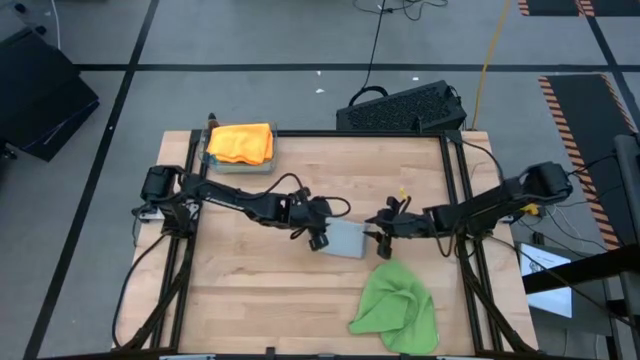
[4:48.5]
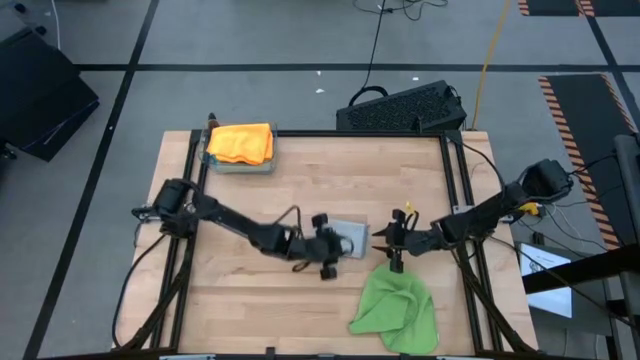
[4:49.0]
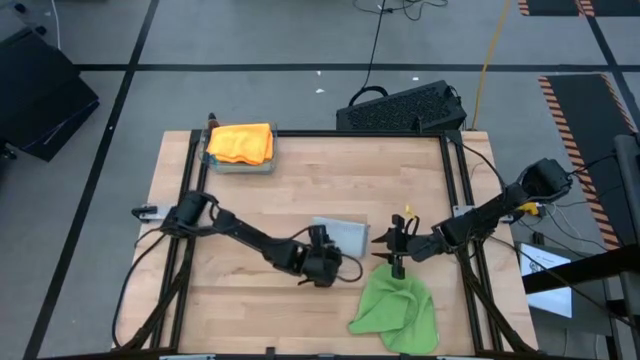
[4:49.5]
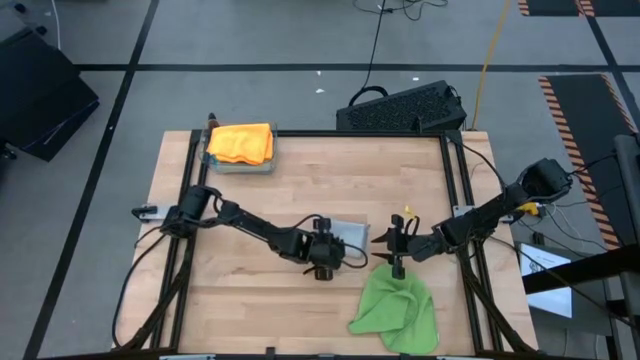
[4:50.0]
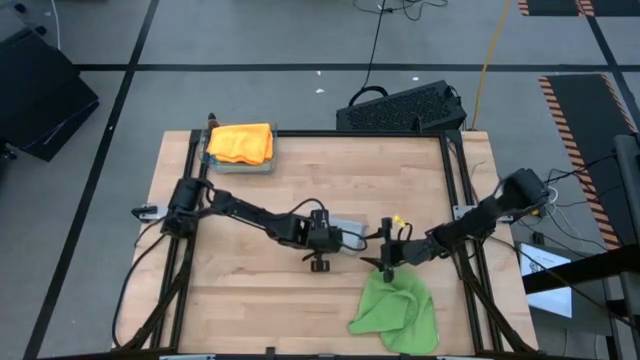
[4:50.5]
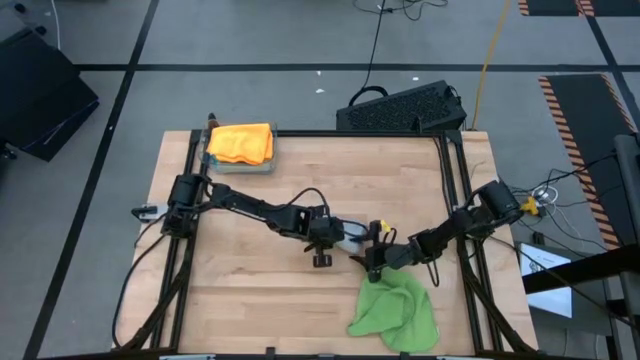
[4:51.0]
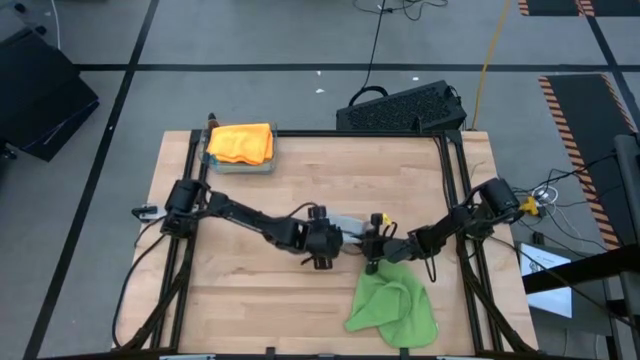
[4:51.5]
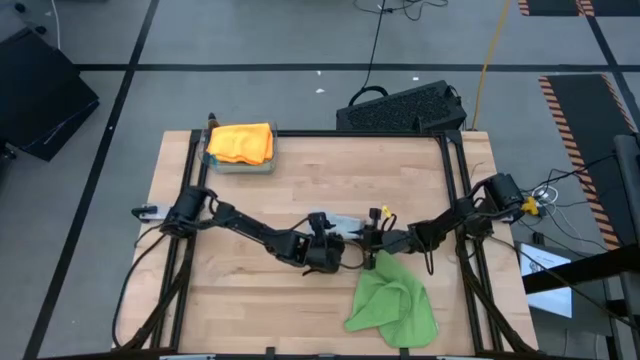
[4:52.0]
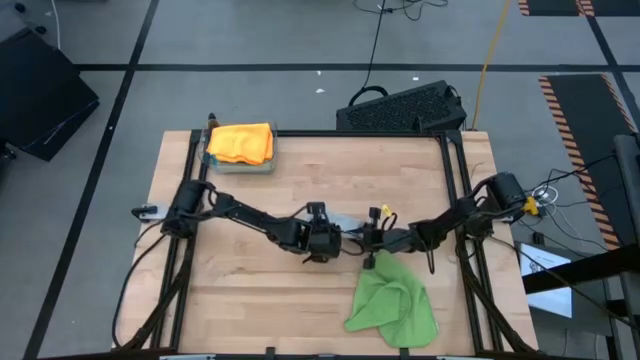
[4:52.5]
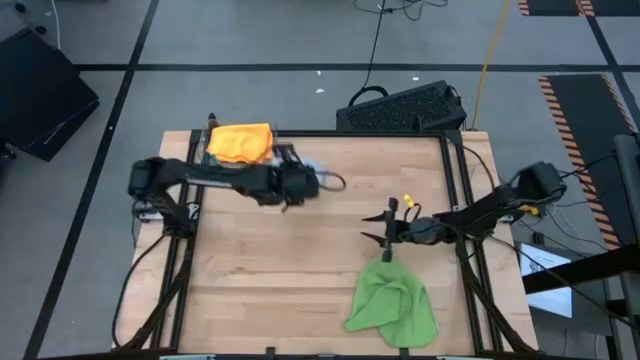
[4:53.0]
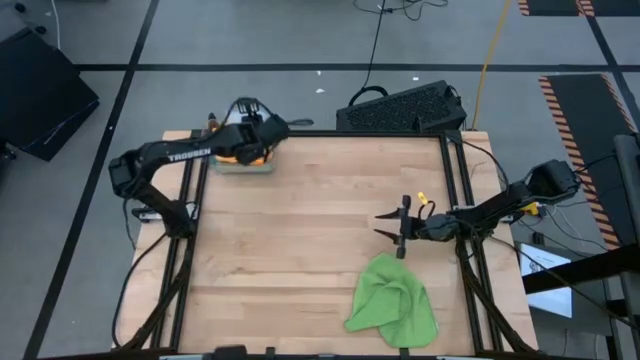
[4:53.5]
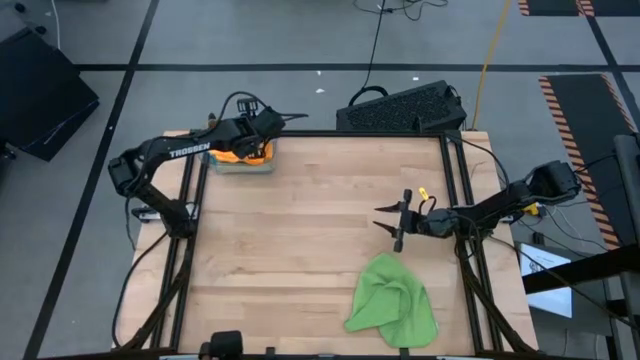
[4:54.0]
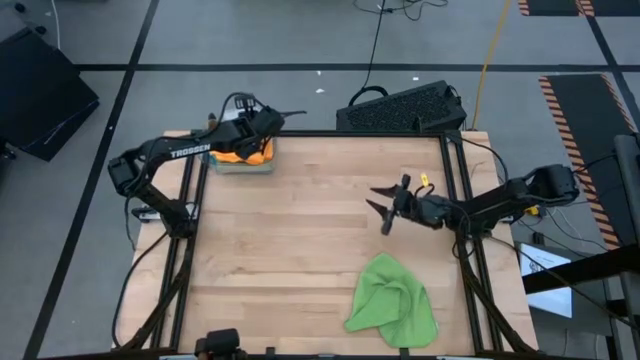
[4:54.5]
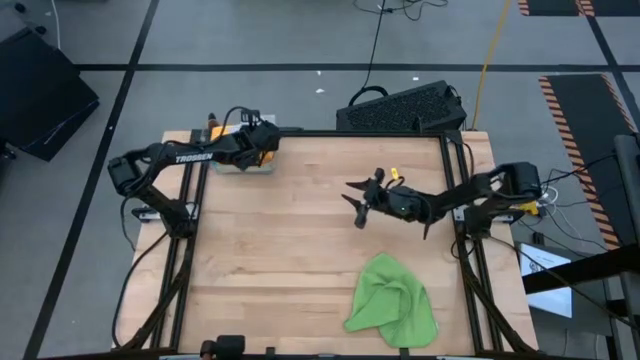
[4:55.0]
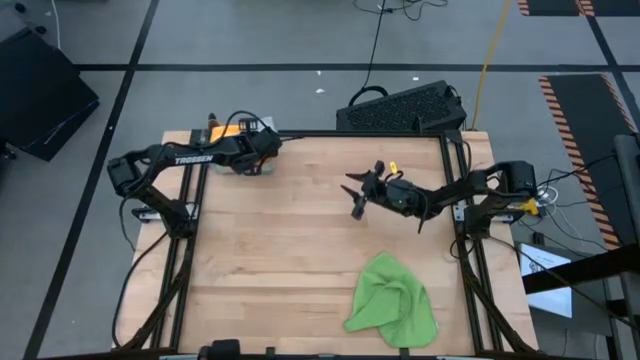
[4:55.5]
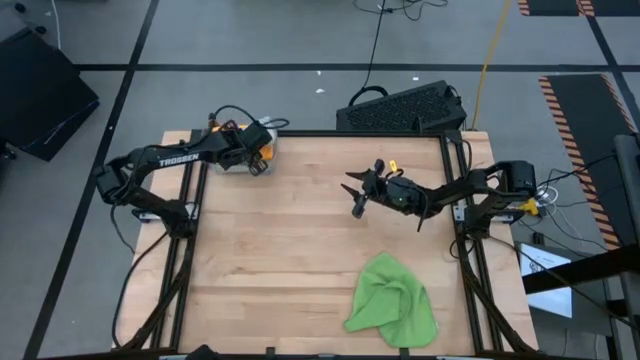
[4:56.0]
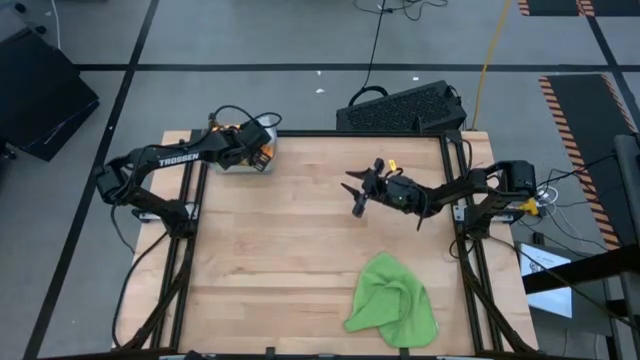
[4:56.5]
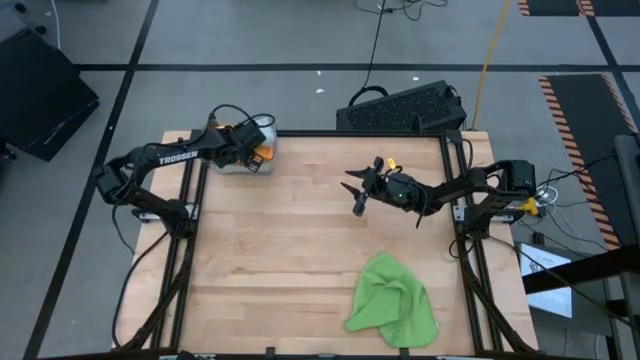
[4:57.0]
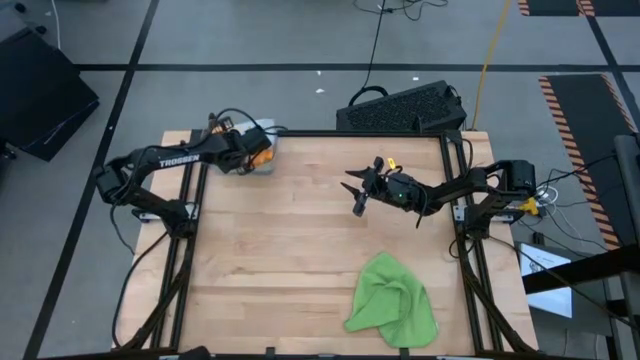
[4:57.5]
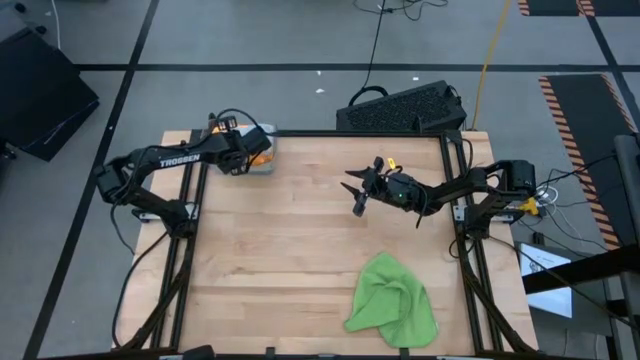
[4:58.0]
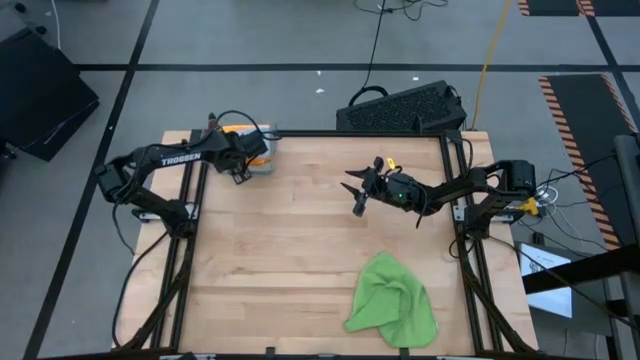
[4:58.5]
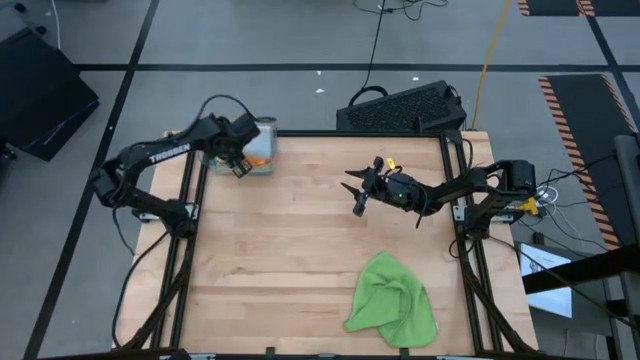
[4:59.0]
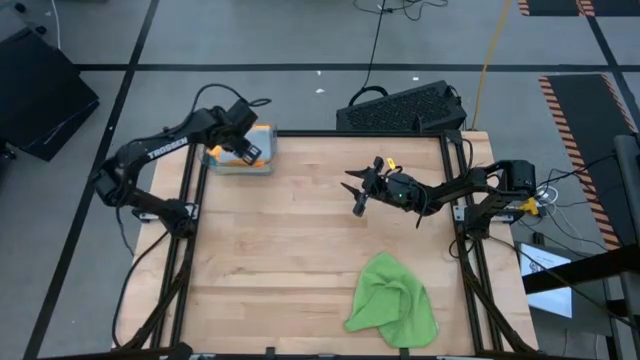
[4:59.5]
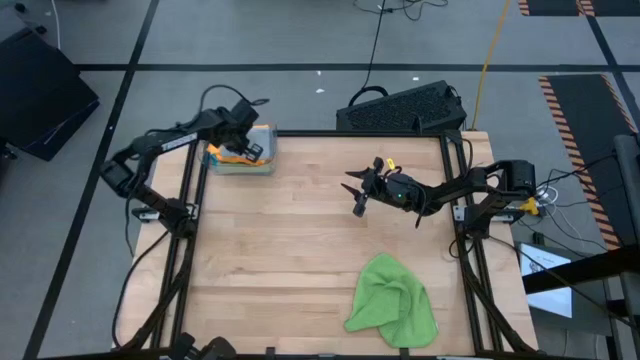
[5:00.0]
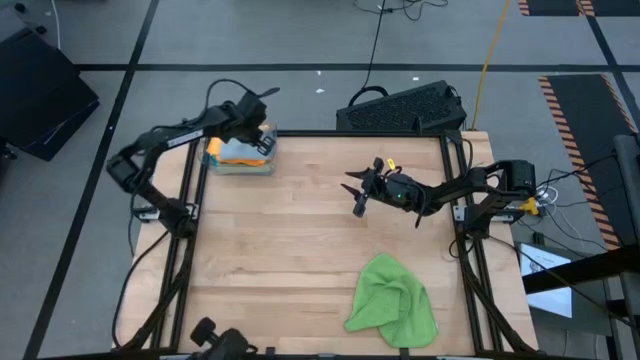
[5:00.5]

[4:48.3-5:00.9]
Task: Fold microfiber towels
Stack the gray microfiber cloth on top of the orange microfiber cloth

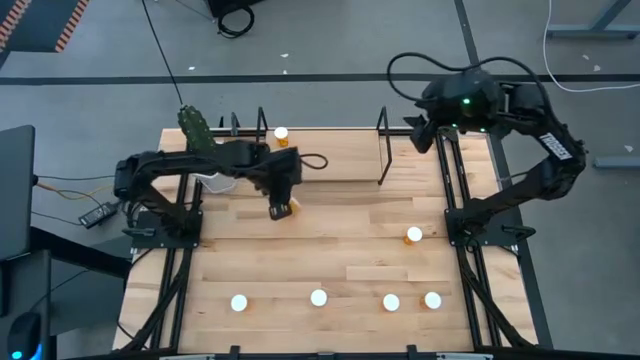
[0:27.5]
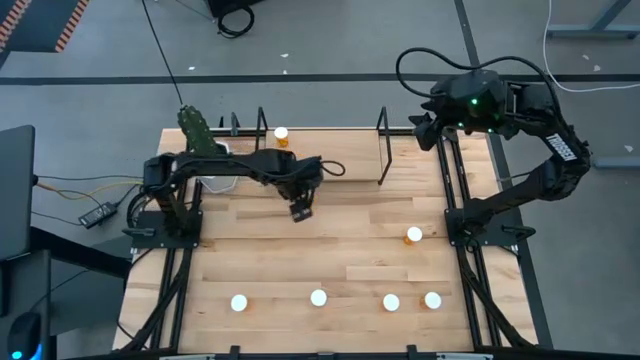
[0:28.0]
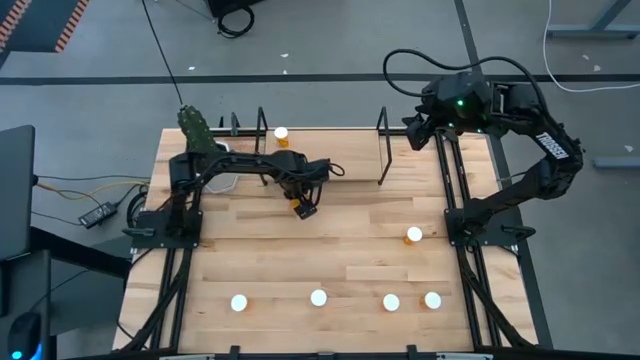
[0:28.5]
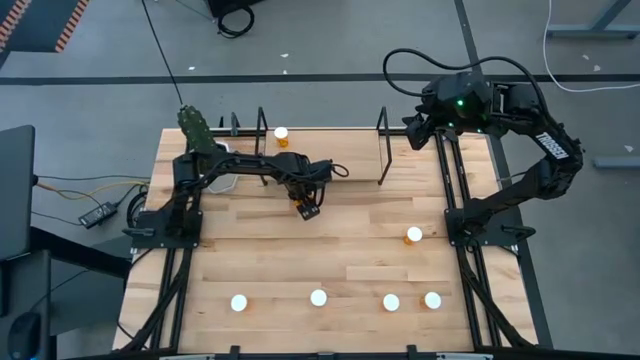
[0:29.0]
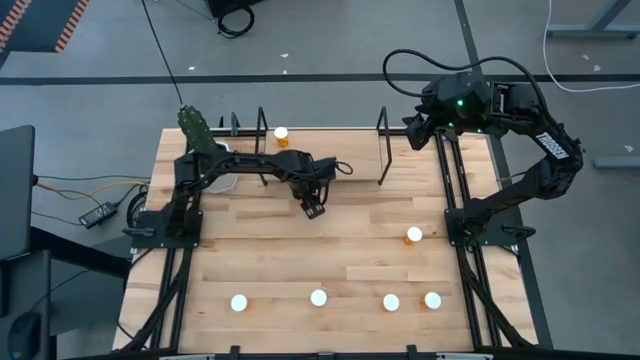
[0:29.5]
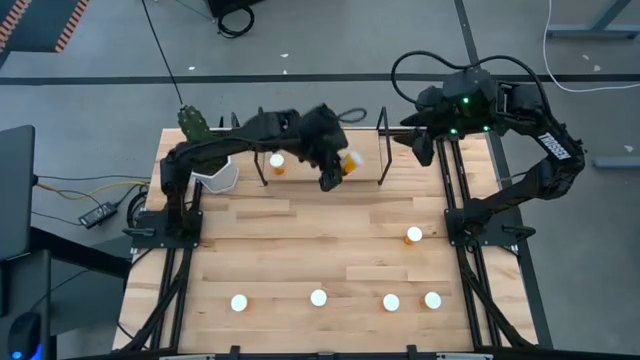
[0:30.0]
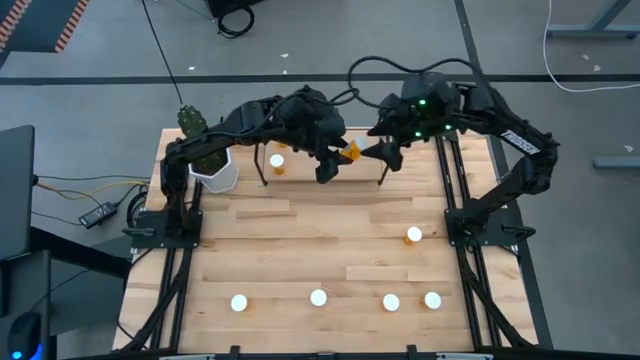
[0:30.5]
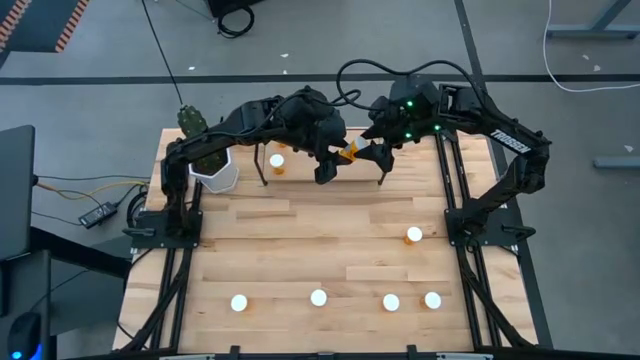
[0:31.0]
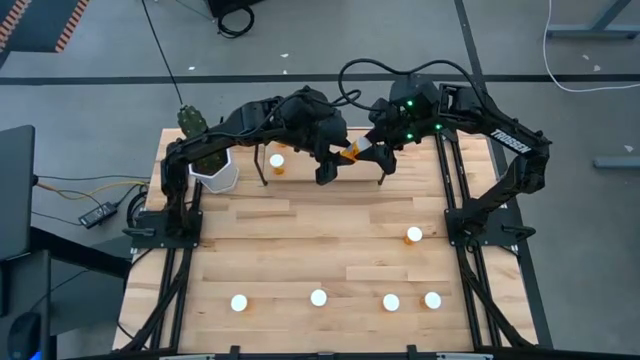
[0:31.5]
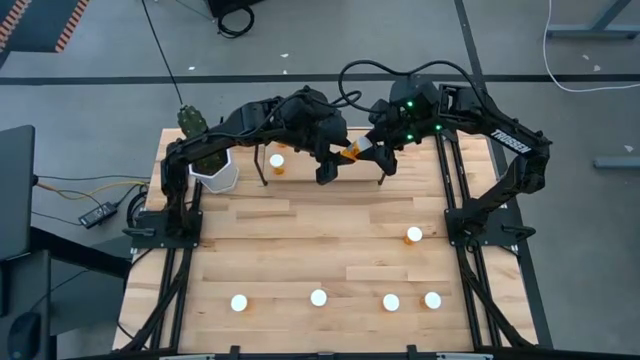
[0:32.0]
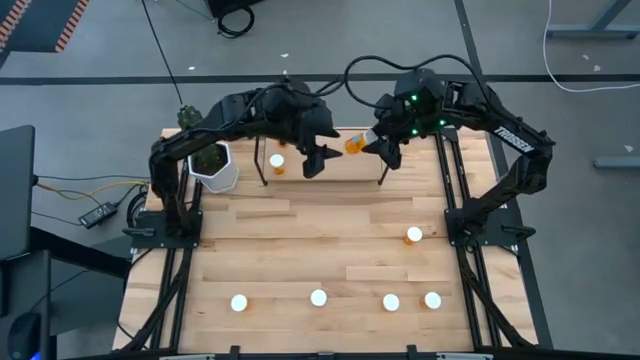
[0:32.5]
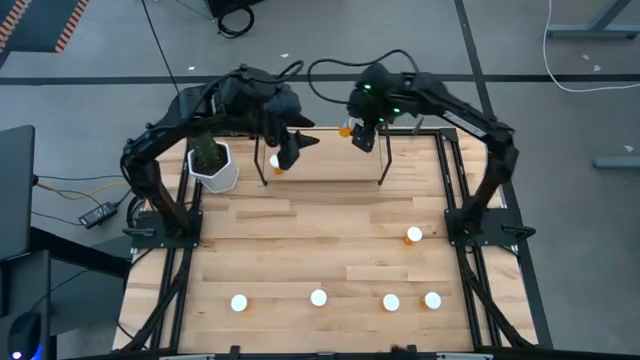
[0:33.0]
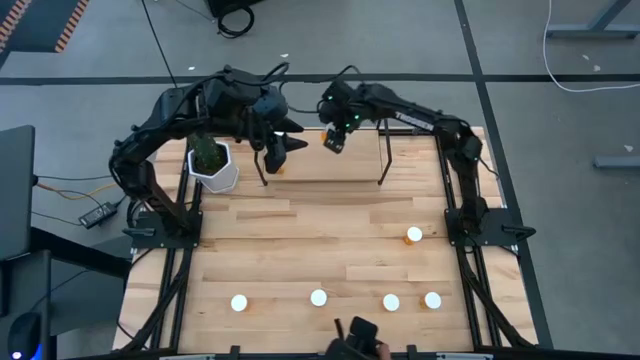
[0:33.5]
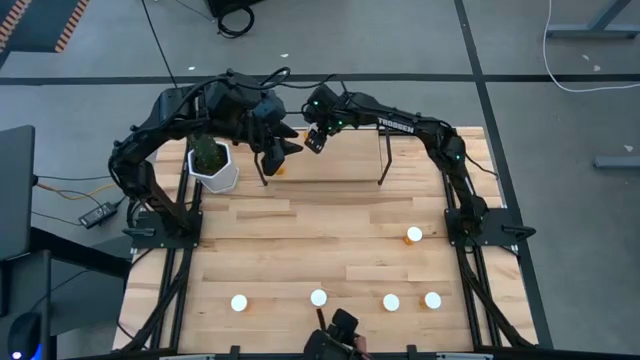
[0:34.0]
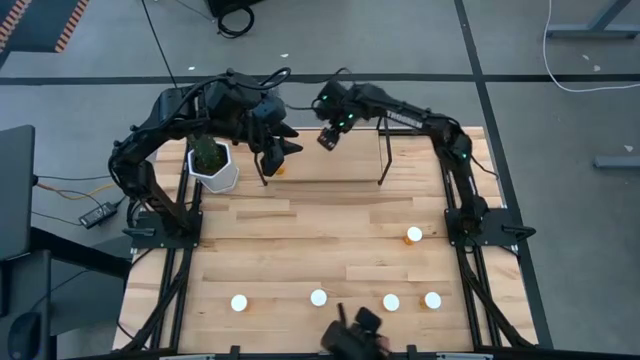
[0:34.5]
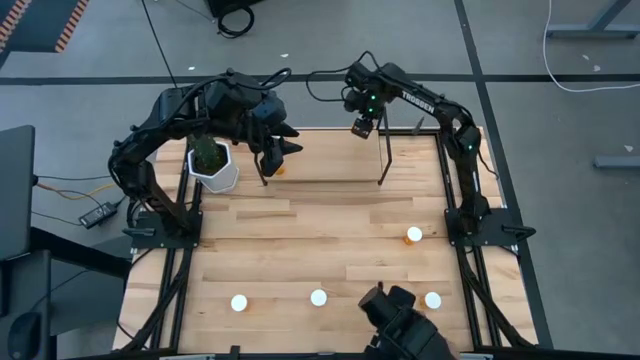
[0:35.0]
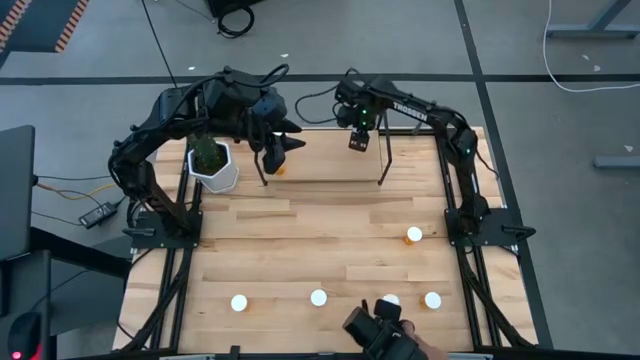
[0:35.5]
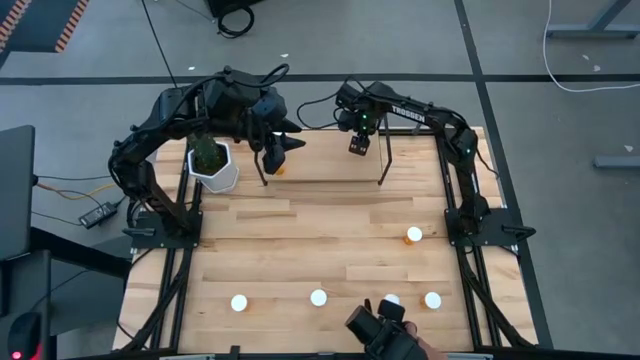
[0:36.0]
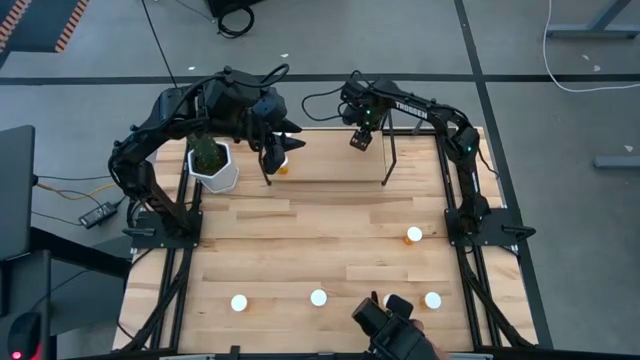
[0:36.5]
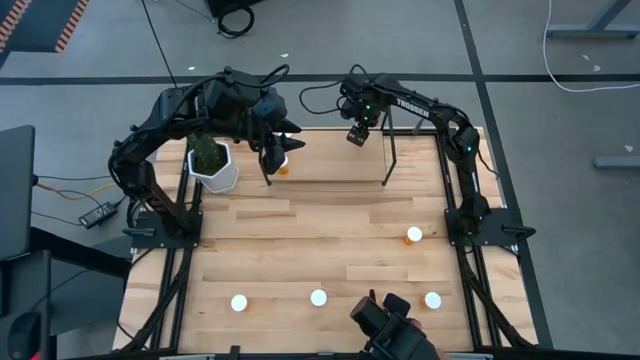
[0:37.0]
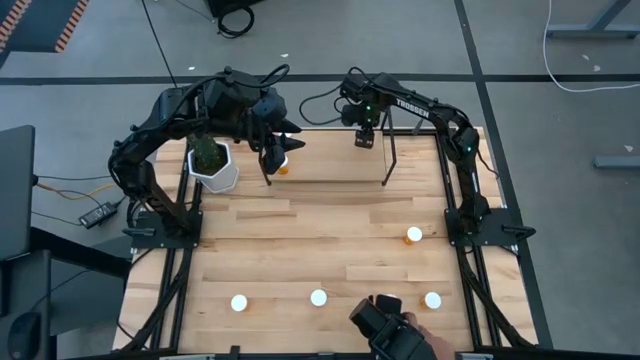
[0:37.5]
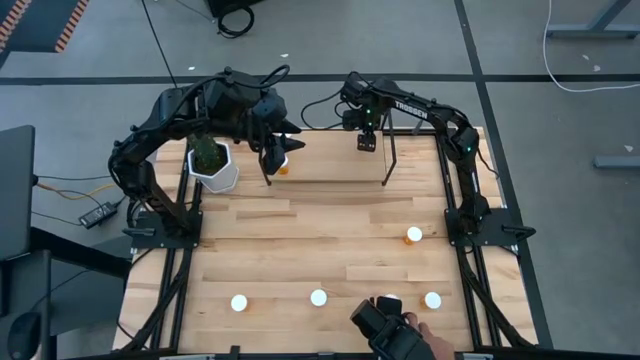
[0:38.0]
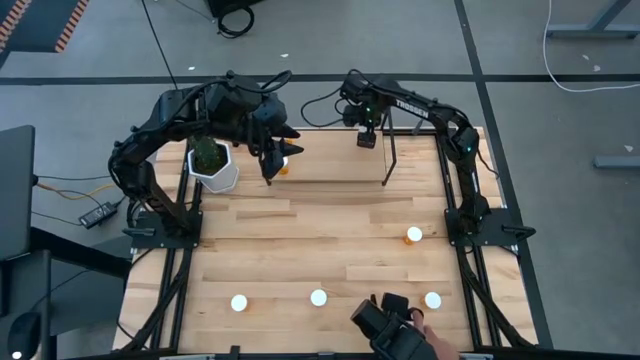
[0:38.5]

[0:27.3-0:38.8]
Task: Pick and place medicine bottles onto shelf by color
Put the orange pill bottle on the shelf
